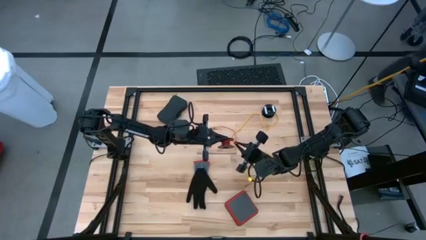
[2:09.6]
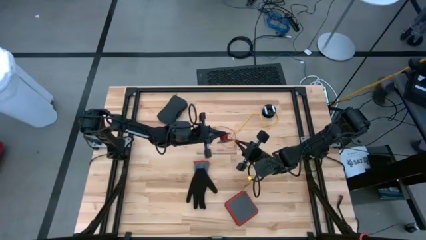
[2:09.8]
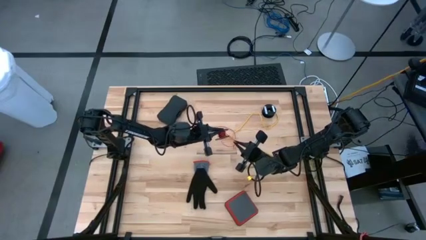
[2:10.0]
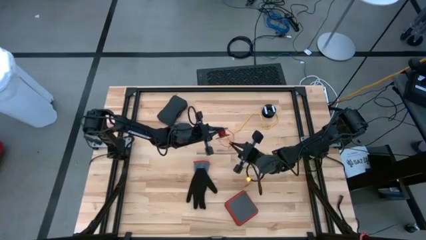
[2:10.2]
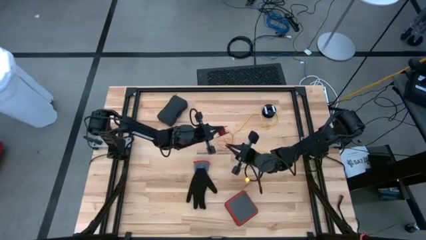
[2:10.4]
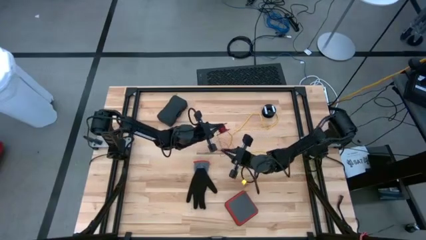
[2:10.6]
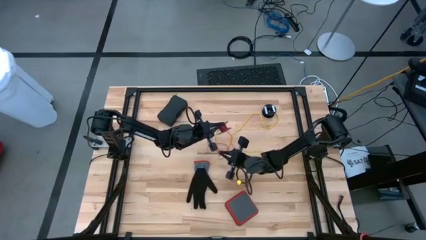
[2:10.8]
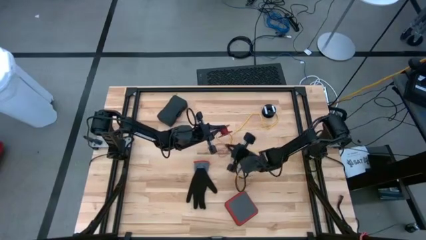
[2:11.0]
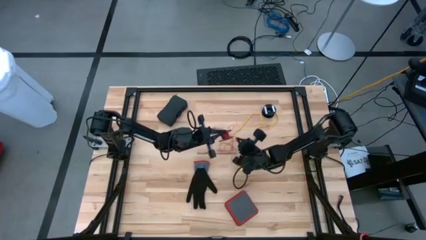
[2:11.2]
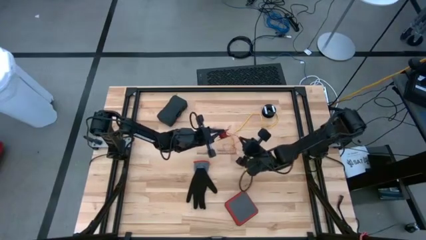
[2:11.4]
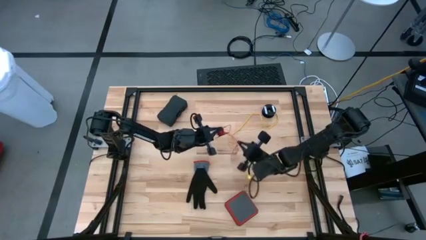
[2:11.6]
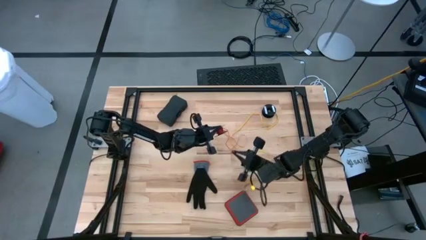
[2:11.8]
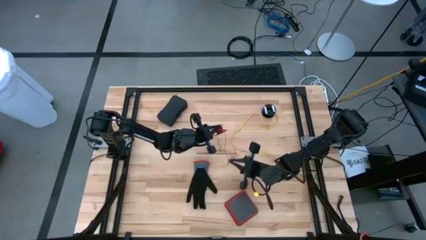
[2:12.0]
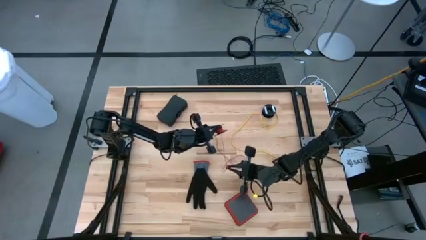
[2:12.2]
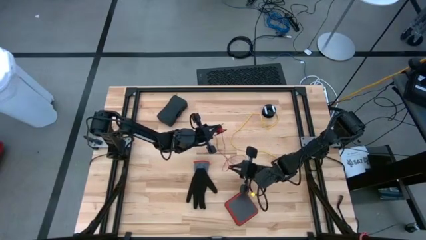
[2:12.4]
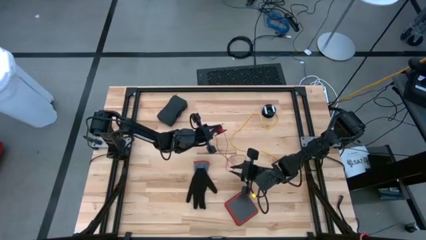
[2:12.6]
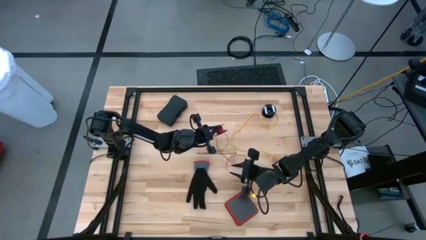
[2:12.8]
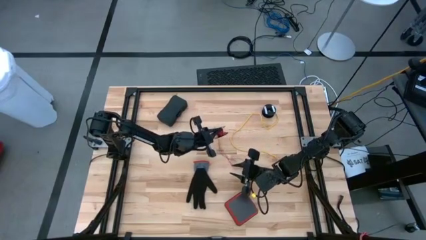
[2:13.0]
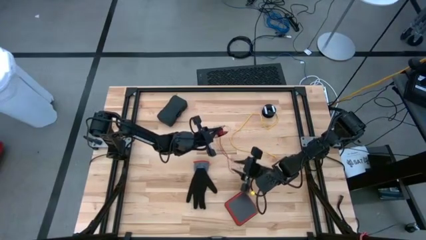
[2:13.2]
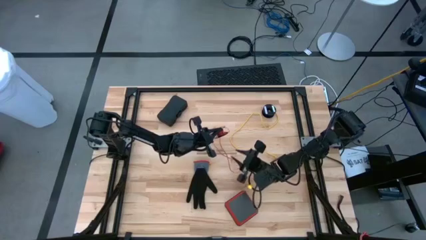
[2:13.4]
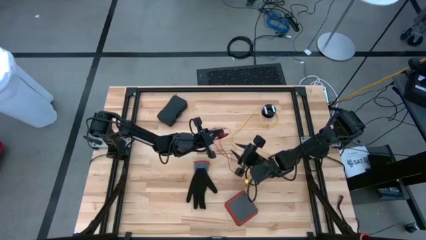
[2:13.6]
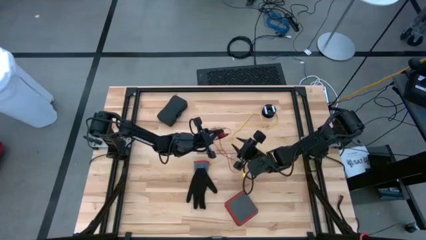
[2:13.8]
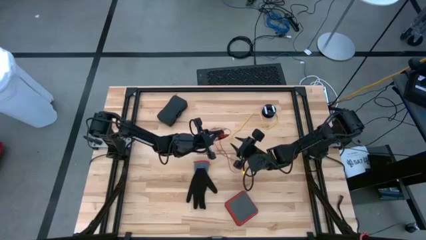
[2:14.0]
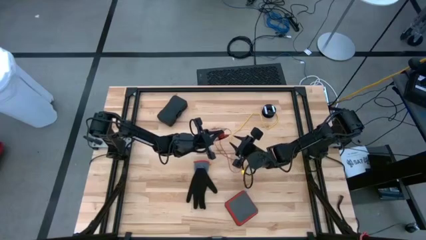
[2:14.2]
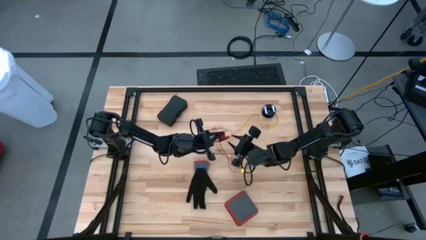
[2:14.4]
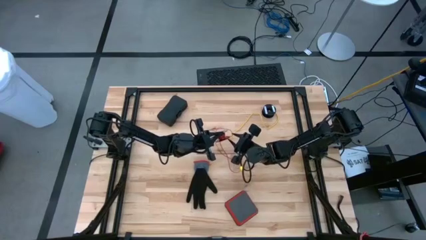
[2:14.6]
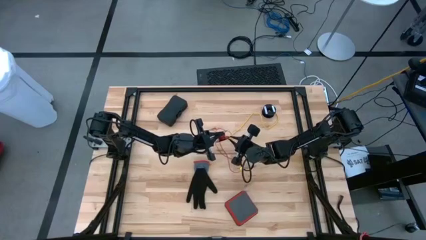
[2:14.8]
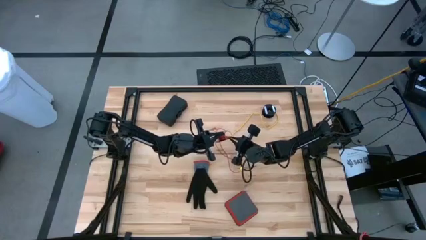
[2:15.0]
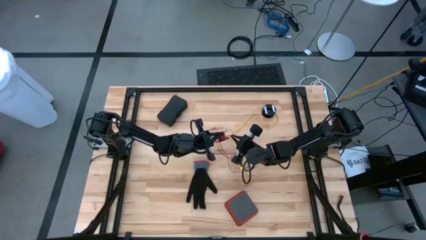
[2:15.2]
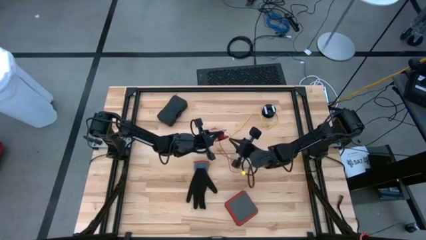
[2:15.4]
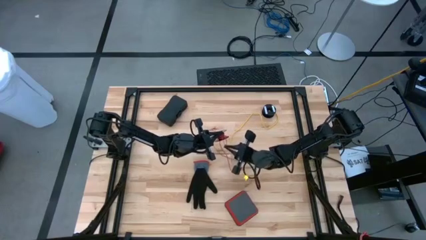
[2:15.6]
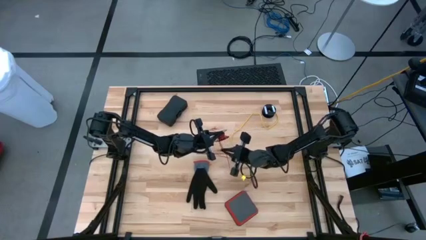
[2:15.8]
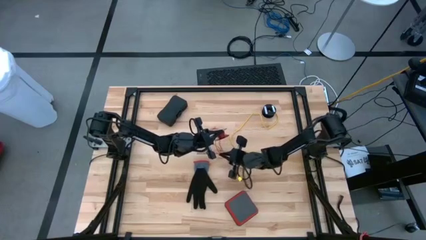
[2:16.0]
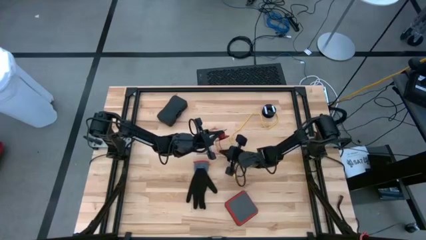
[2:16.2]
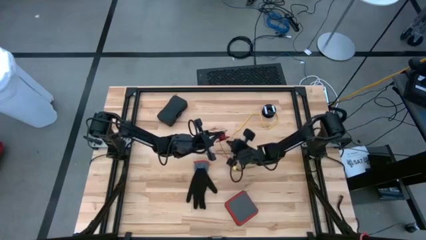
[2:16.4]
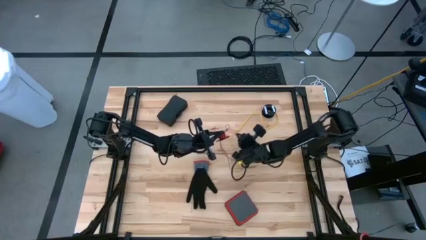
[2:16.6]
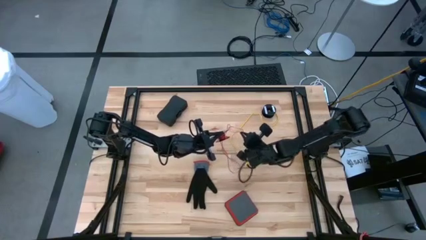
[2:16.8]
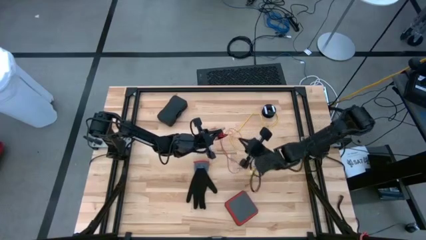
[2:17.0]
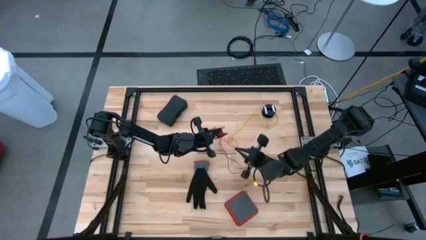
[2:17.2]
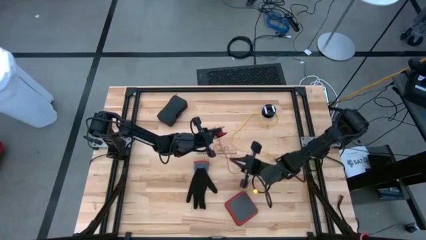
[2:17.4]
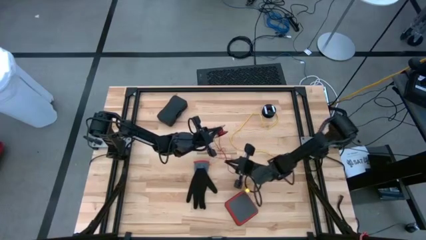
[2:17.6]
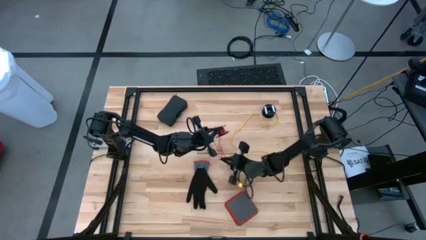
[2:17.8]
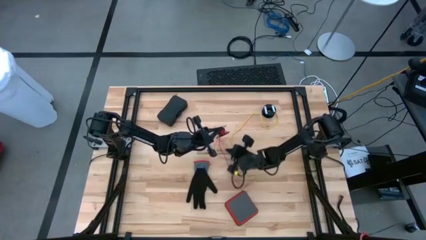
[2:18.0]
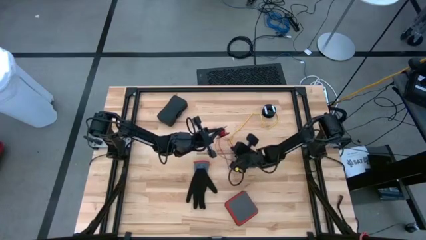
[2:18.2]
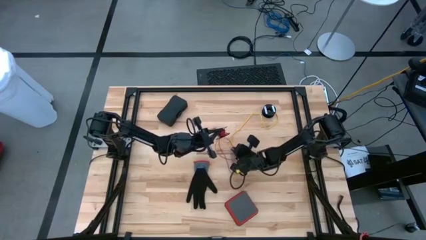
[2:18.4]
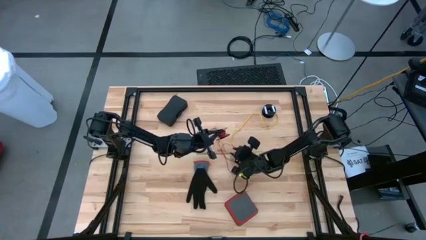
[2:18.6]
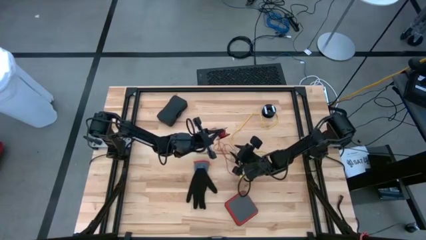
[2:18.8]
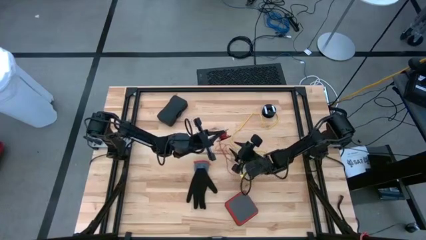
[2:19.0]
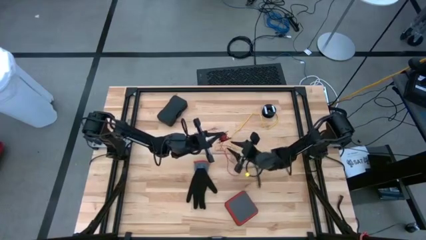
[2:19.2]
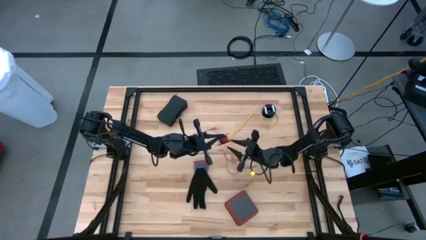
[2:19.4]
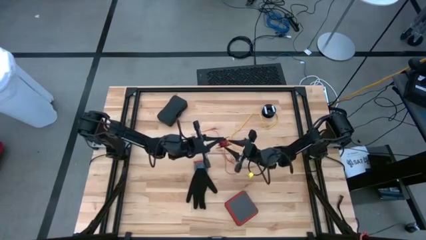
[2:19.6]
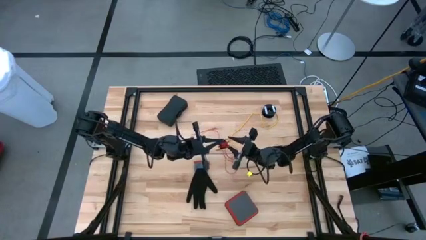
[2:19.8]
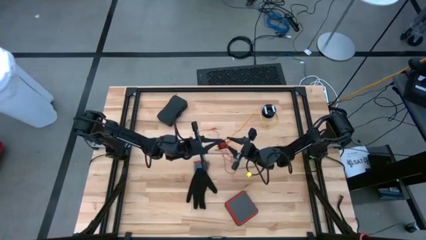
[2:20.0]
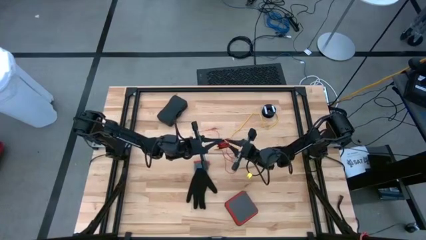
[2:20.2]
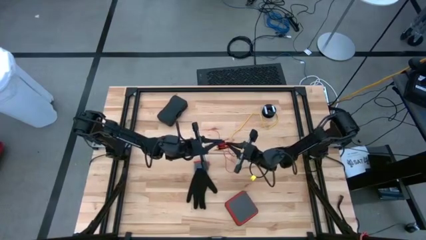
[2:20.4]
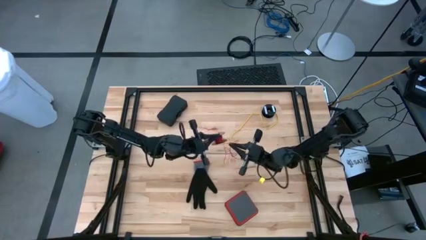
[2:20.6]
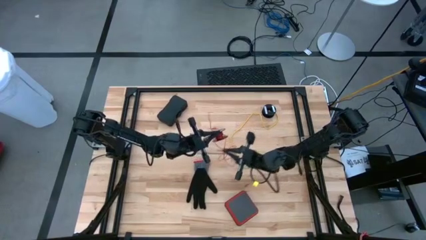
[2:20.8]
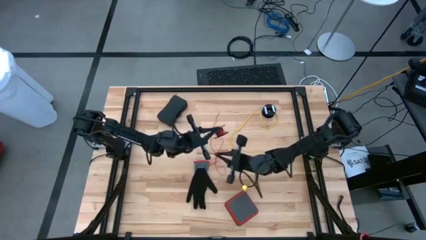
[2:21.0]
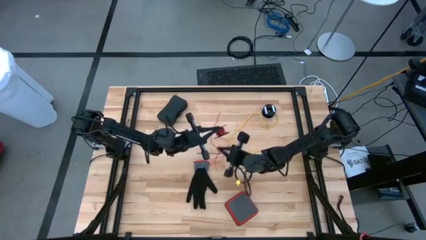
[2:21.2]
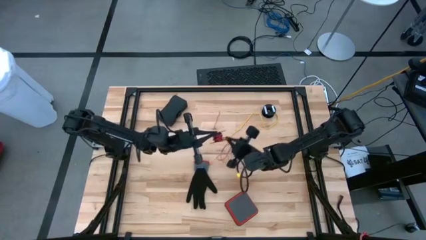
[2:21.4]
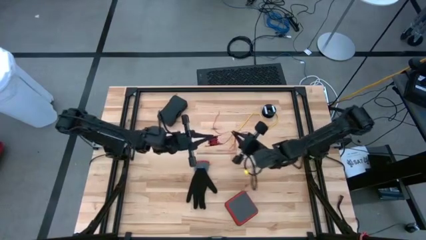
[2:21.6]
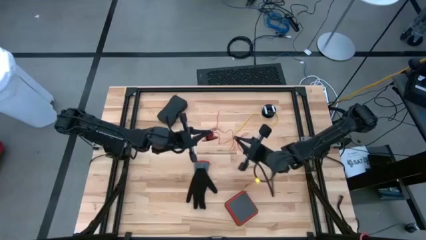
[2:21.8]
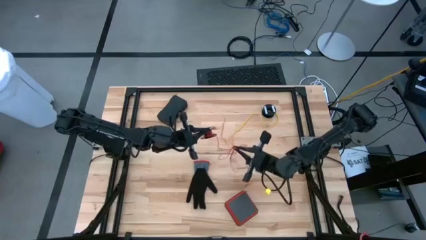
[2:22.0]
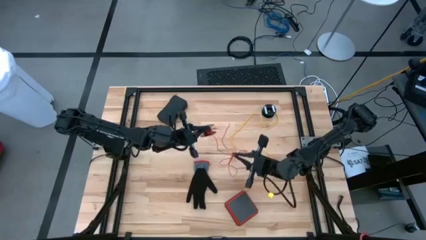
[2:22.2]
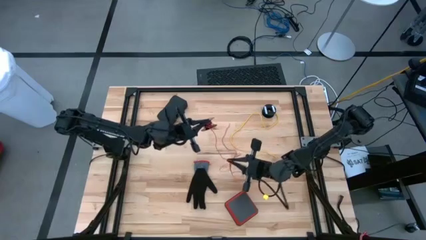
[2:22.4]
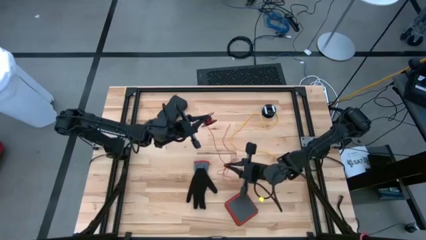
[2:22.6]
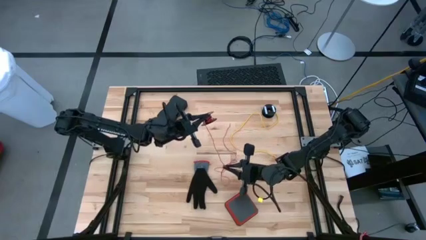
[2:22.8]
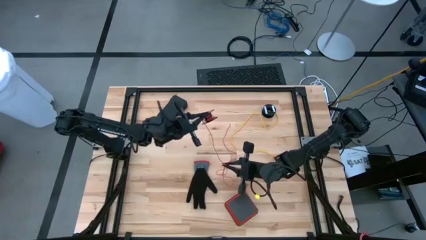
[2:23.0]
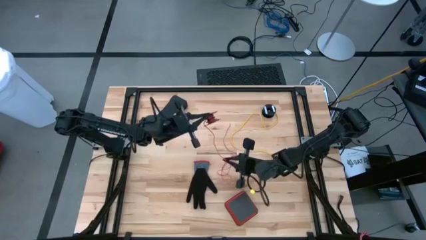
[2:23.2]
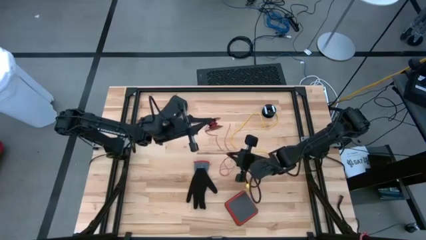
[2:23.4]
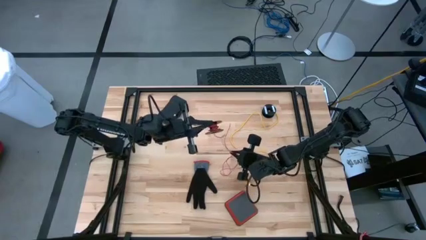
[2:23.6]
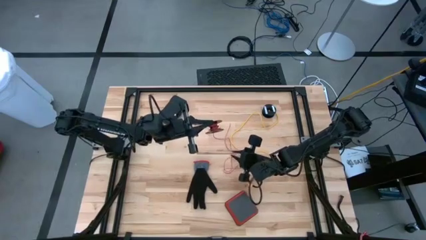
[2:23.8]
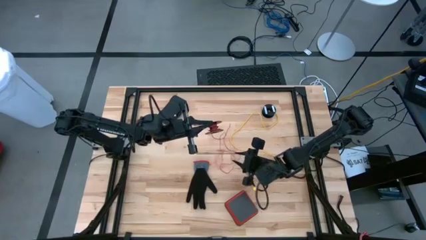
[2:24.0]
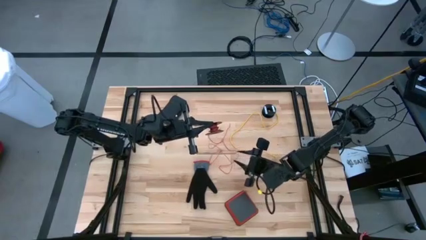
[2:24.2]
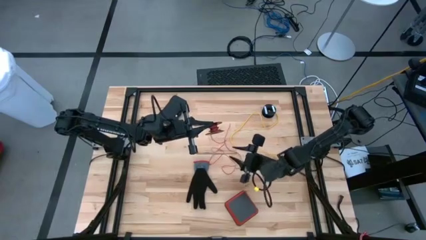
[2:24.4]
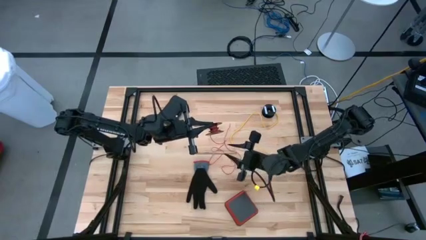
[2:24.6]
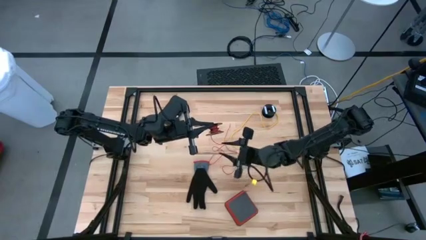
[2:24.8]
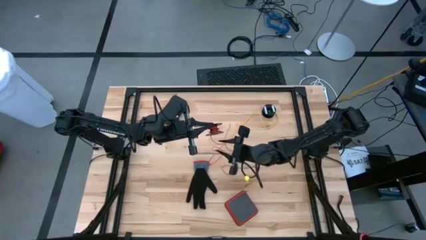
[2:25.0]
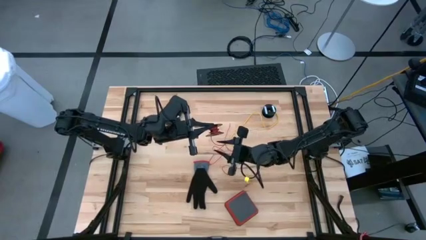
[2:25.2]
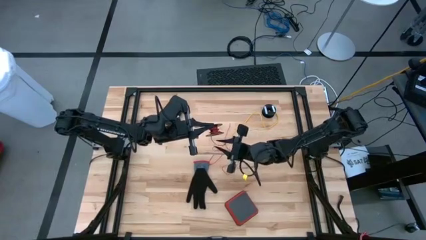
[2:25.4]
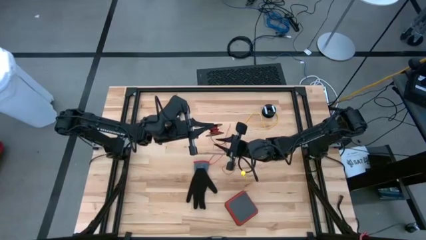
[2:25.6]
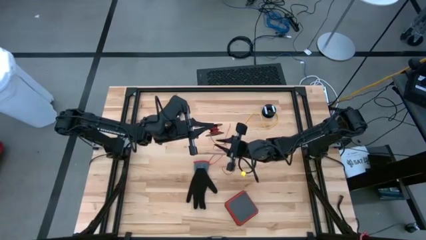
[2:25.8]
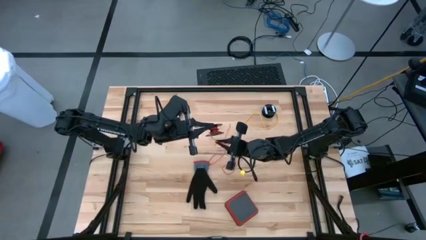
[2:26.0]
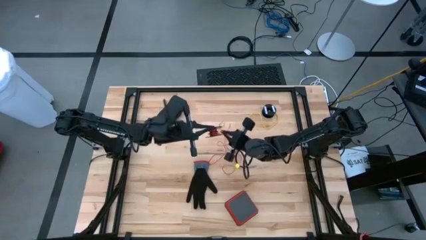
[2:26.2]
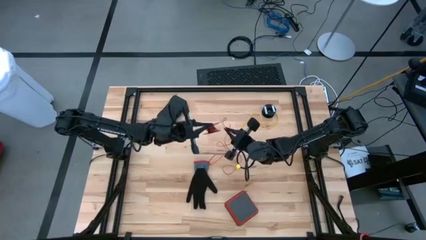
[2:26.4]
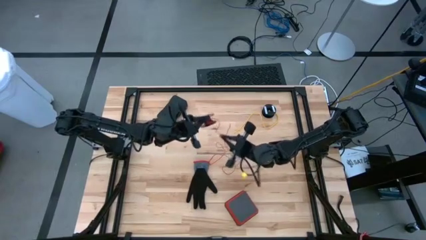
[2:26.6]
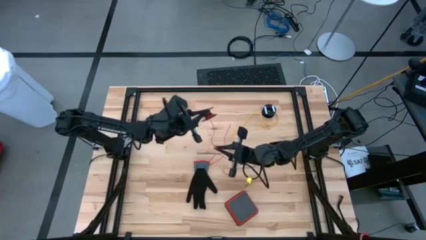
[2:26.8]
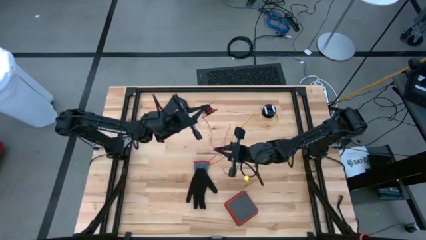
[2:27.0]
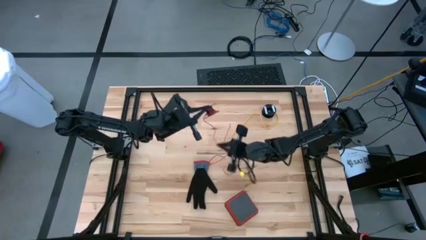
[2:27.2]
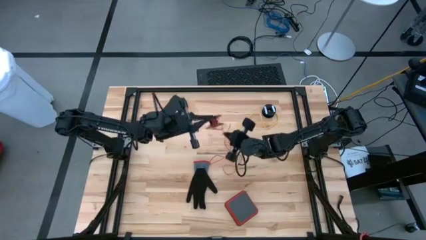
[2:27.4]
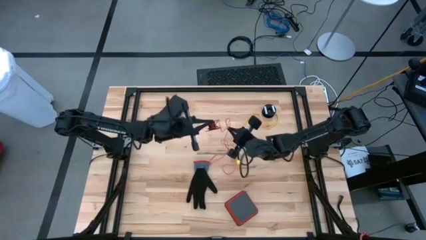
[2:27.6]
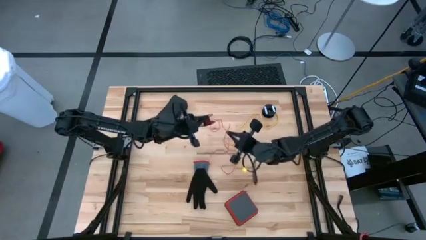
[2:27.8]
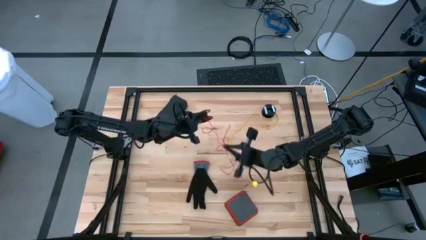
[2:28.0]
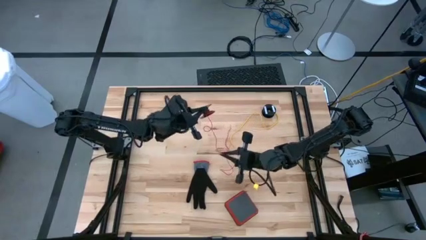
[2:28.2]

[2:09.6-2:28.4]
Task: Coil cords
Uncoil the red wire from the black spool
